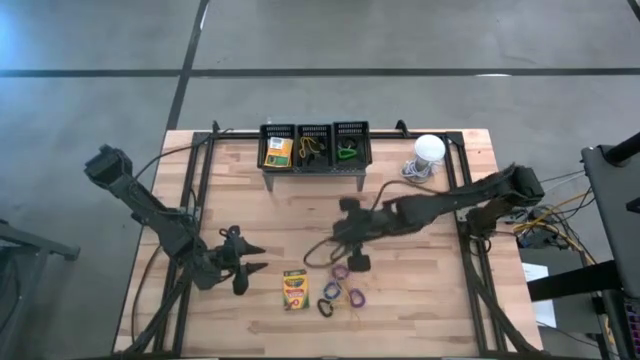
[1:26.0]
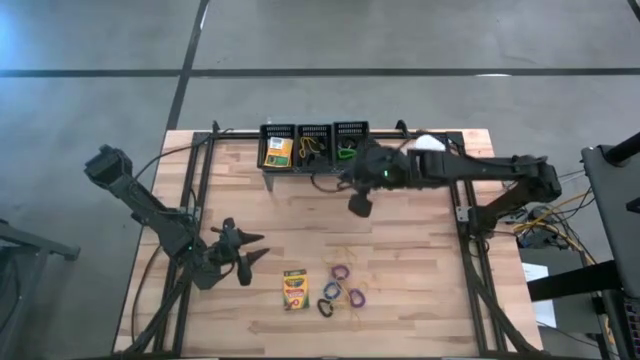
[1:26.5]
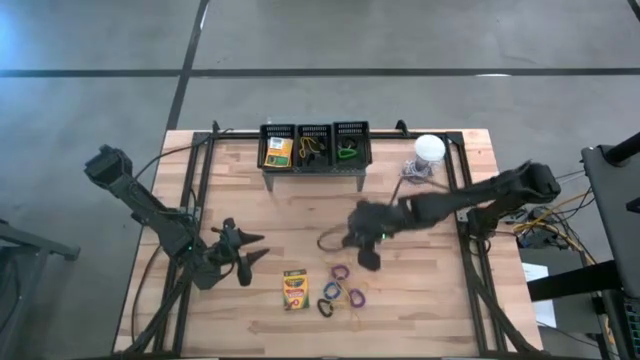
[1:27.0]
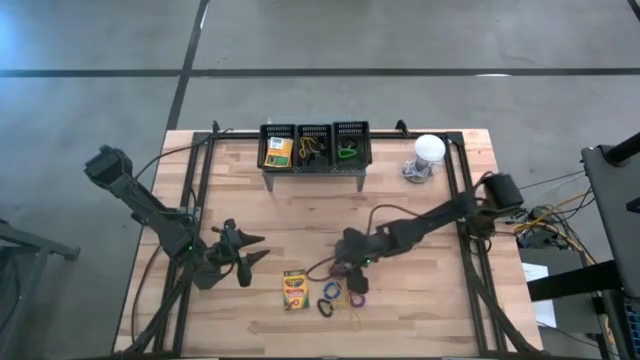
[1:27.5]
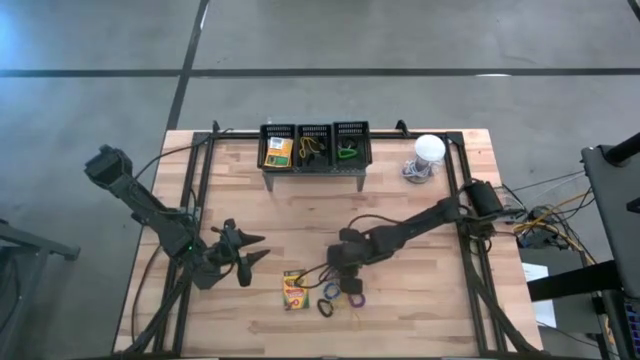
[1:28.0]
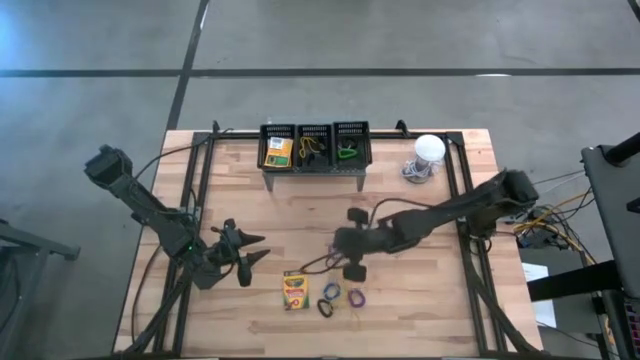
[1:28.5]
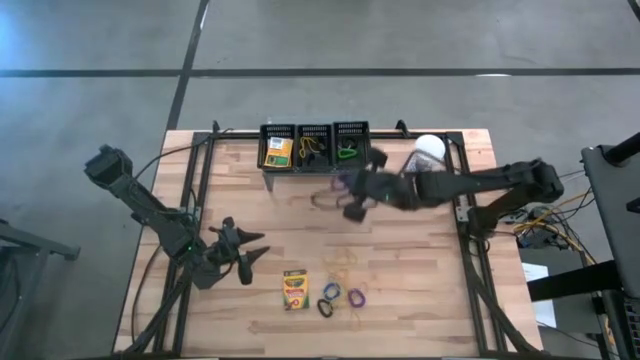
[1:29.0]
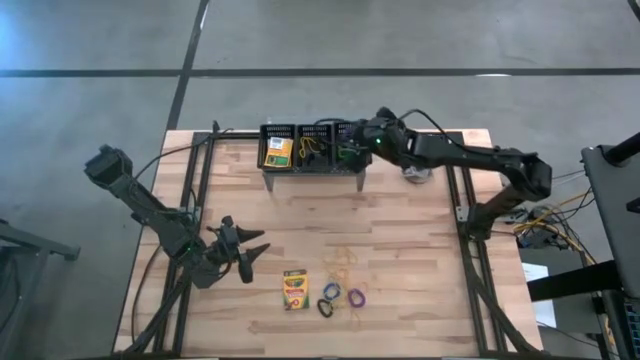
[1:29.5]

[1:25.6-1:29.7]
Task: Pick & Place Office Desk Supplies
Put the top purple spring key chain into the right black bin

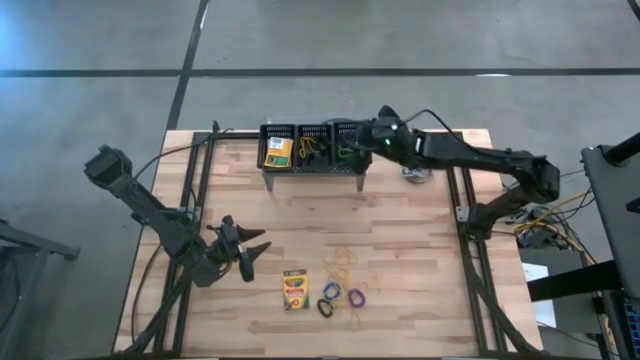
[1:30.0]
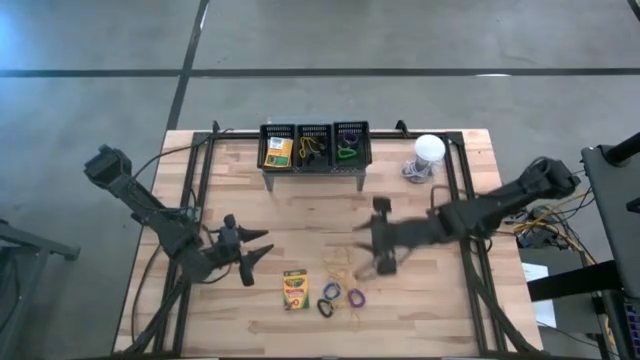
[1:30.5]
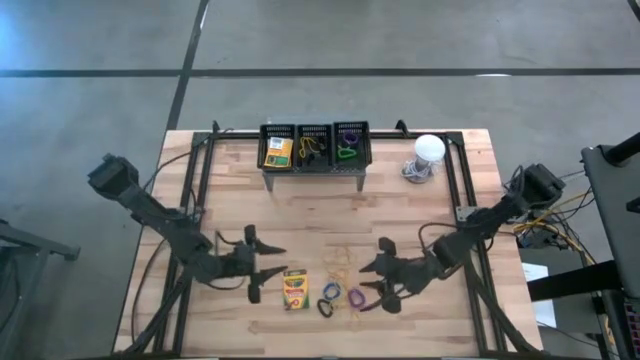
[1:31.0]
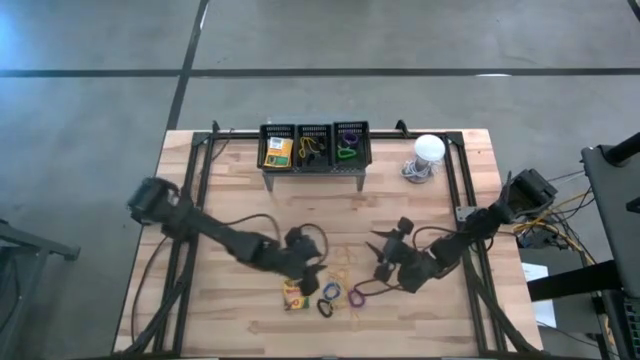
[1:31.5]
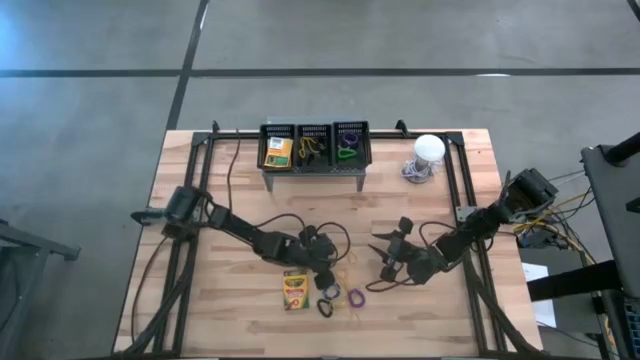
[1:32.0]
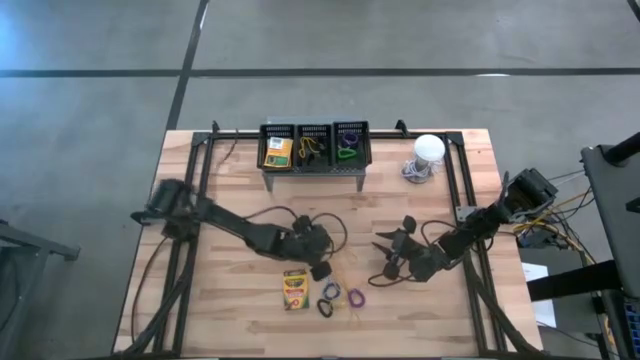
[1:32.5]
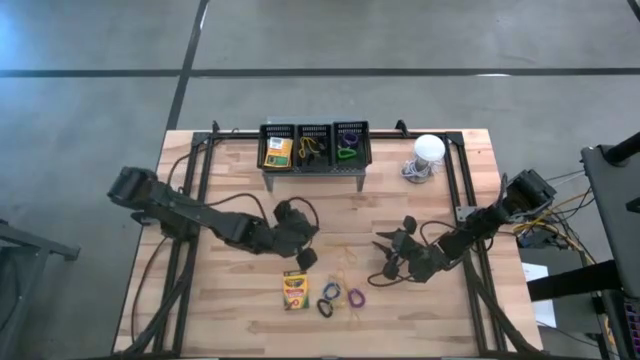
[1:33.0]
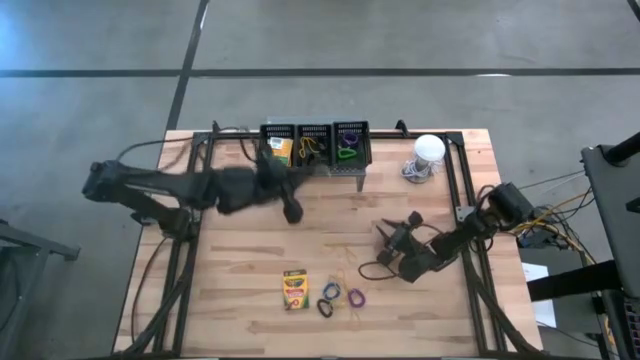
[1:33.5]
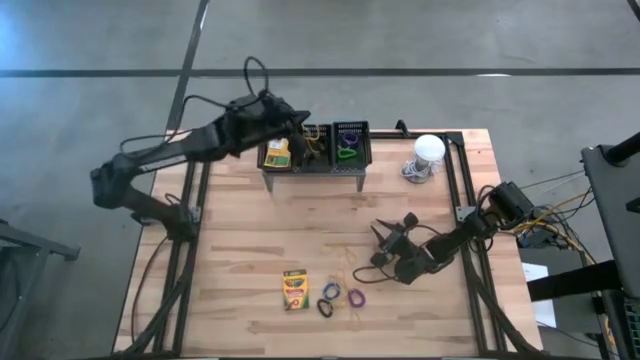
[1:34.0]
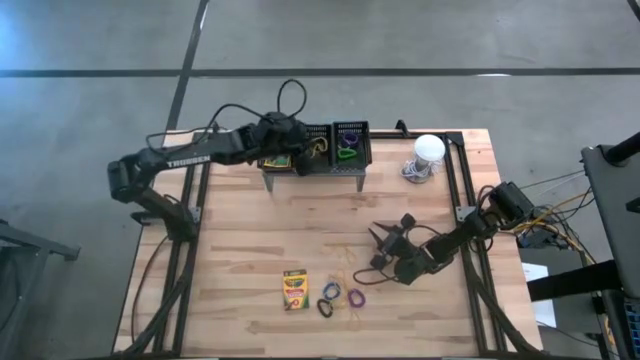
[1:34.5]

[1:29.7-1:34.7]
Put the yellow rubber band into the middle black bin

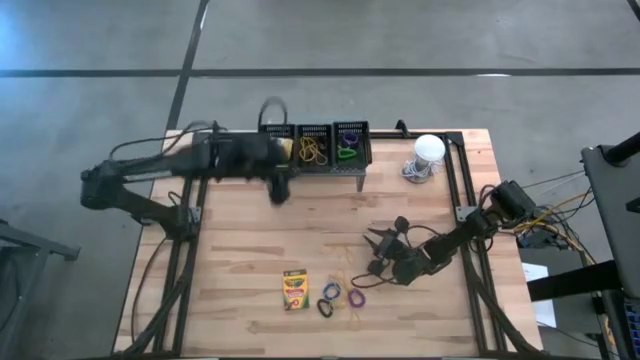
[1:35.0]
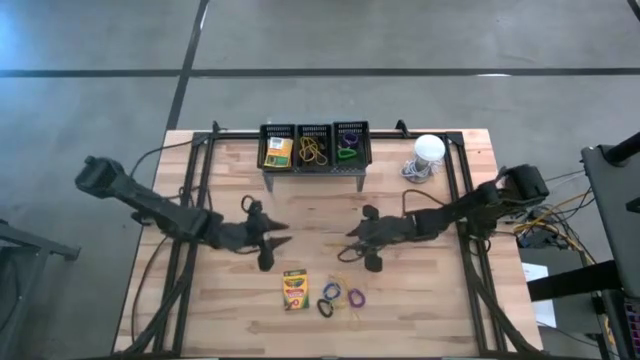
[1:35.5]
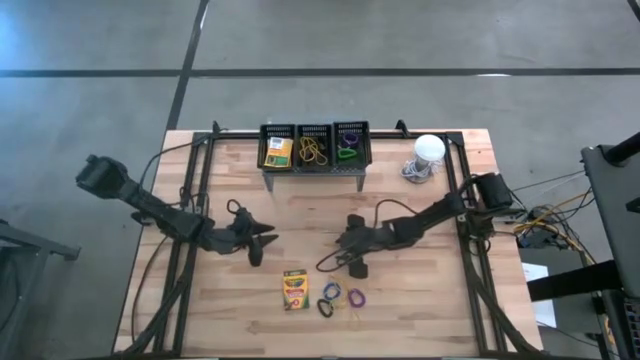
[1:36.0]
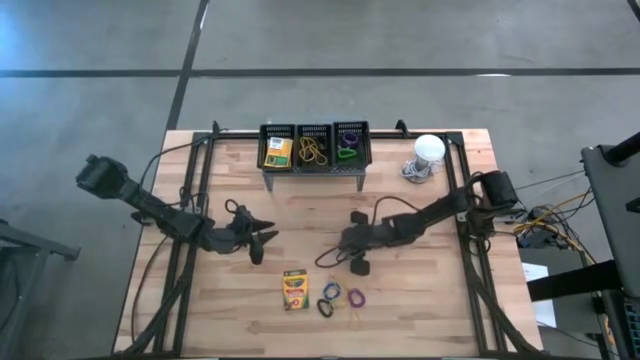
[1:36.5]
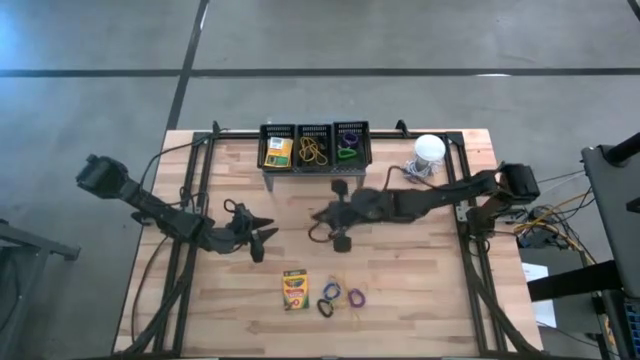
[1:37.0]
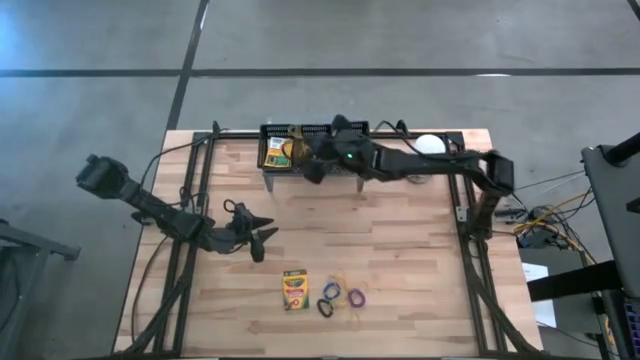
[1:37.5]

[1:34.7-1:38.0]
Put the yellow rubber band into the middle black bin

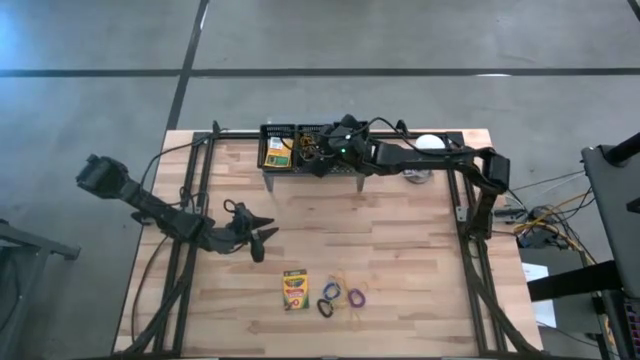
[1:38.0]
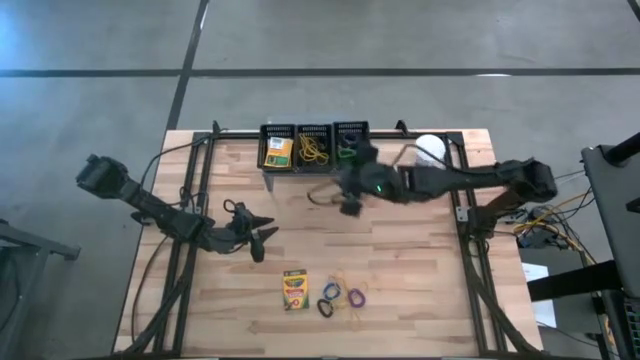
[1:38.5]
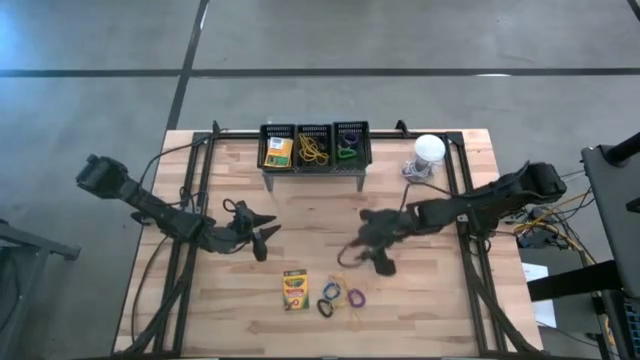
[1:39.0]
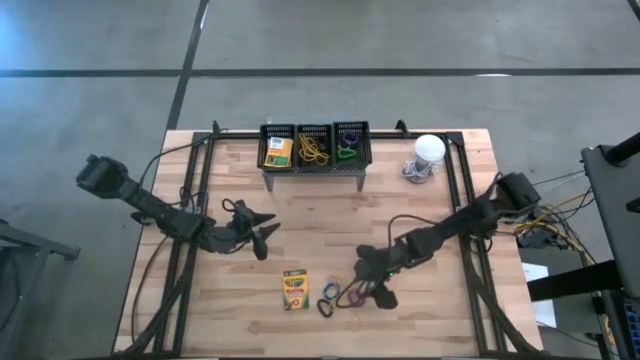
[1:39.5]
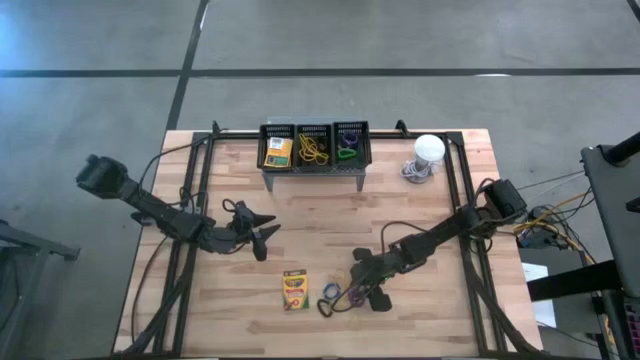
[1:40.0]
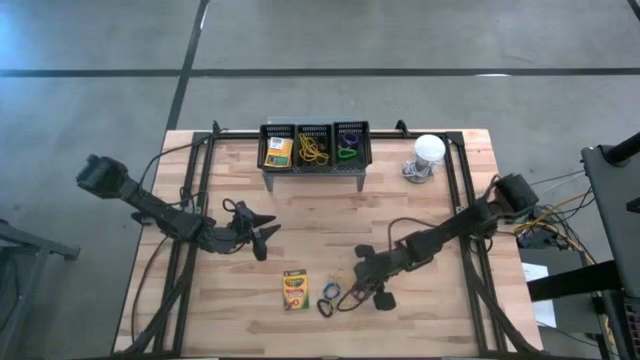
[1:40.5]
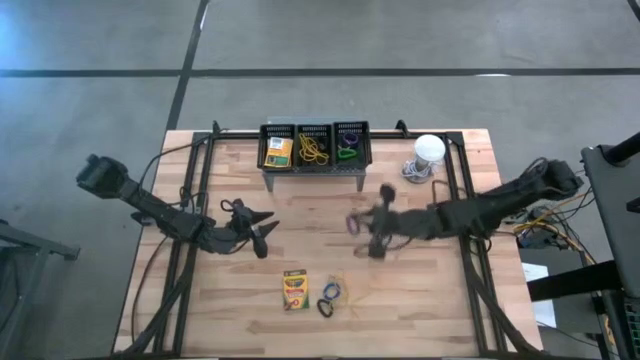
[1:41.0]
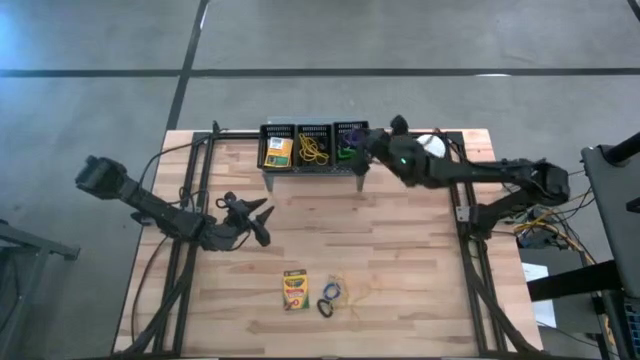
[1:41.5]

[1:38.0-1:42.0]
Put the purple spring key chain into the right black bin

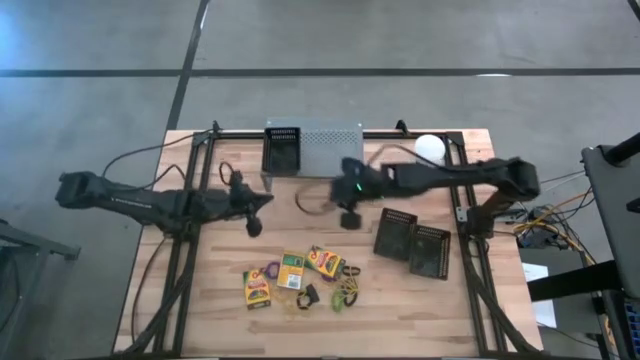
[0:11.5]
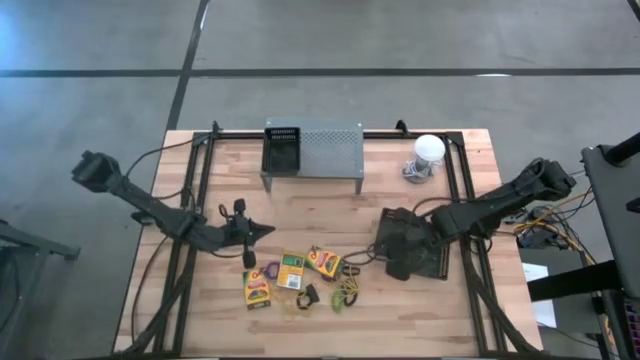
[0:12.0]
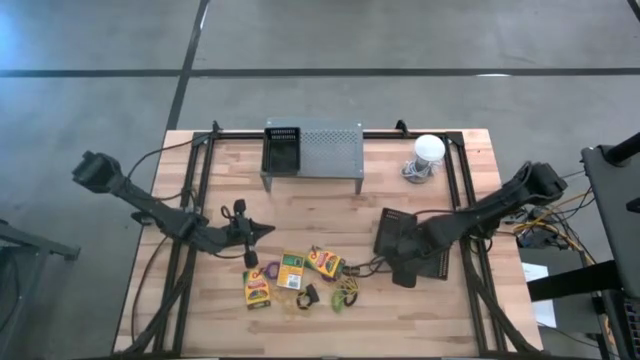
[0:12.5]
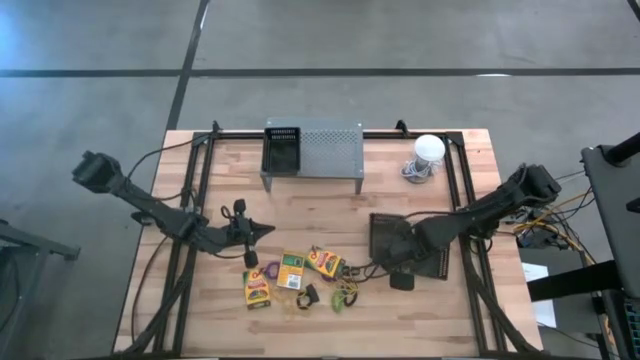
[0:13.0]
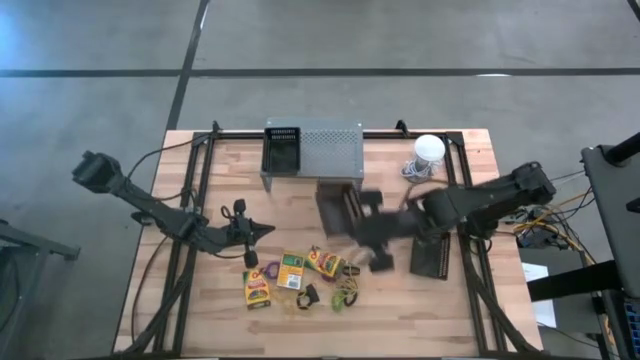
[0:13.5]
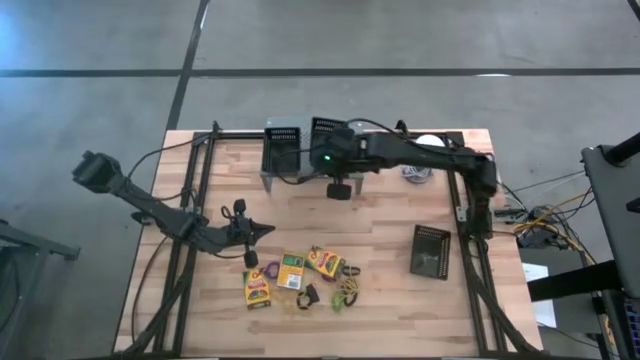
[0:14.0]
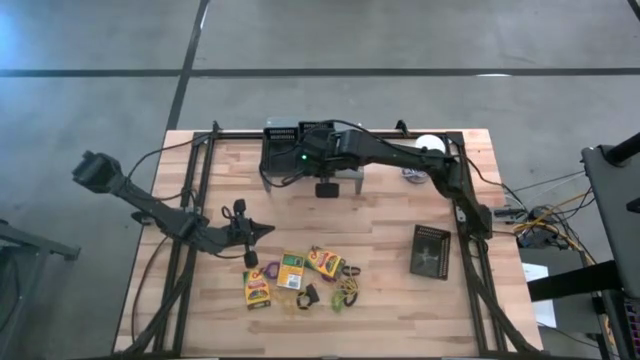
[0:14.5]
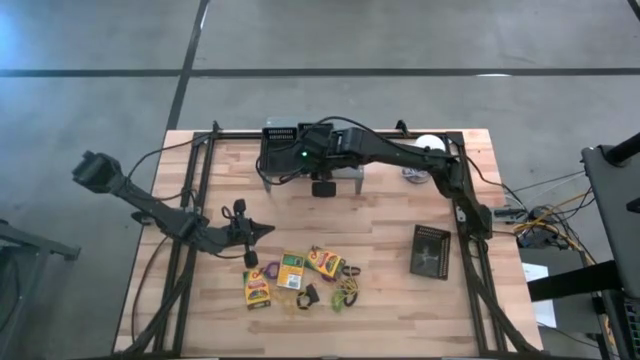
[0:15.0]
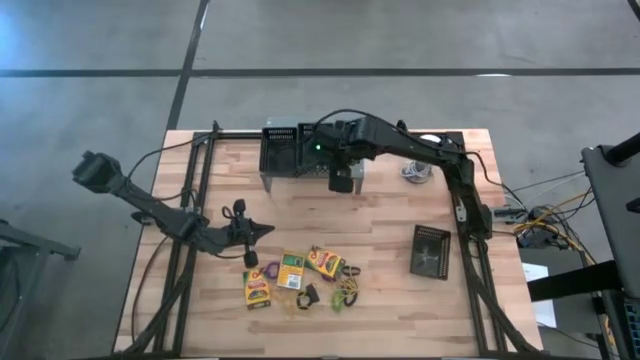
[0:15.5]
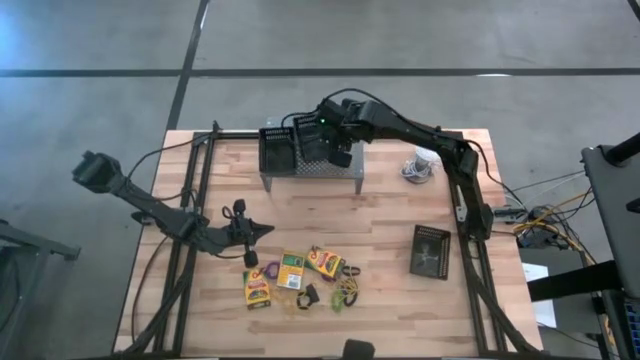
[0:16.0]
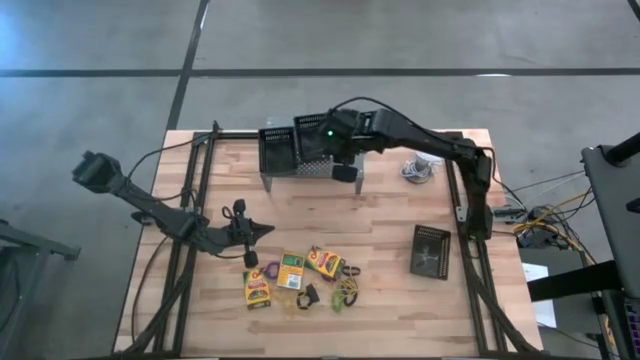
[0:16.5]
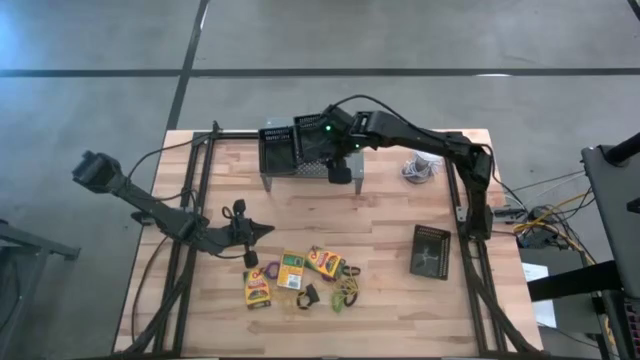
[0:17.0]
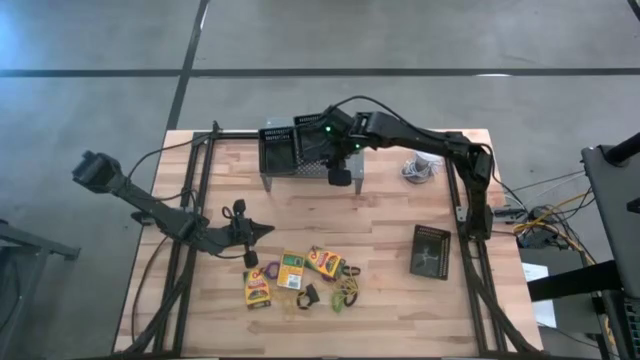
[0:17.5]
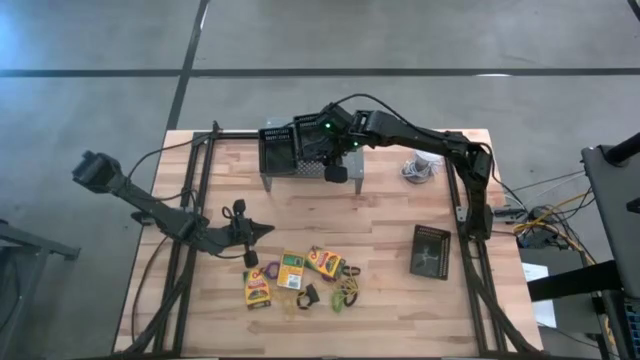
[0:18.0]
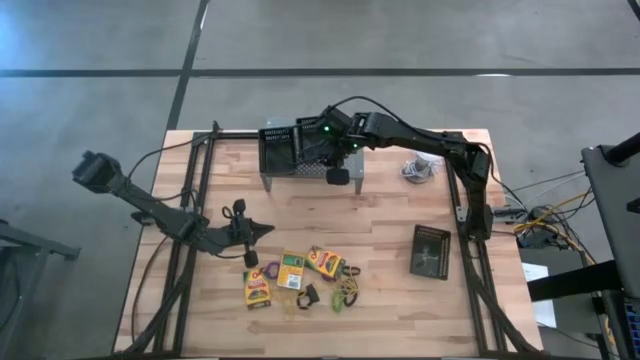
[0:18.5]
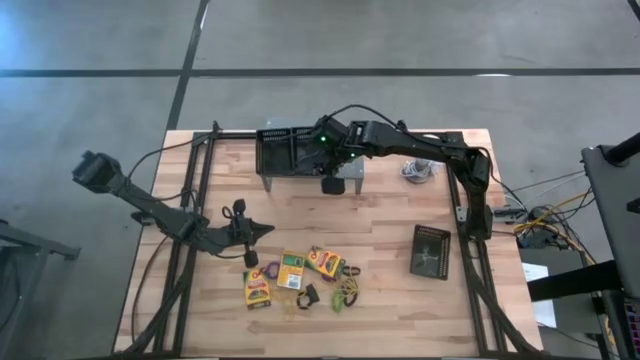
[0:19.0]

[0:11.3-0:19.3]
Task: Pick & Place Office Desk Supplies
Put the left black basket
